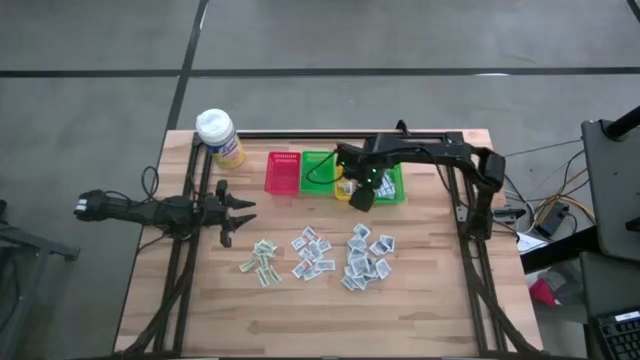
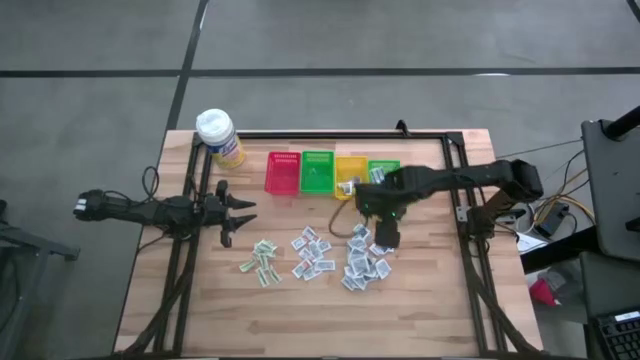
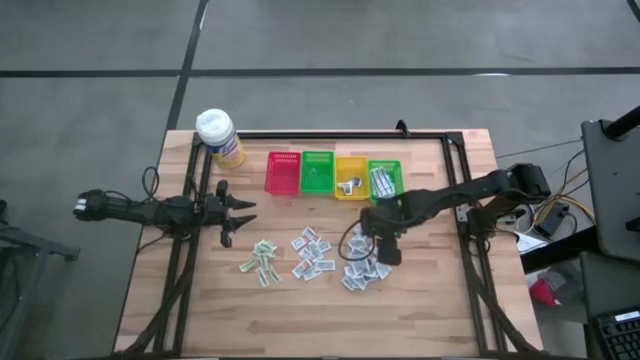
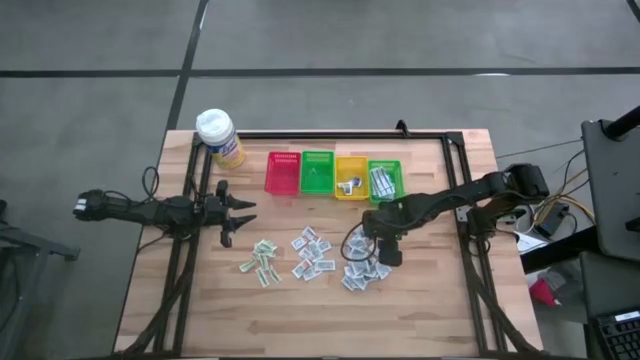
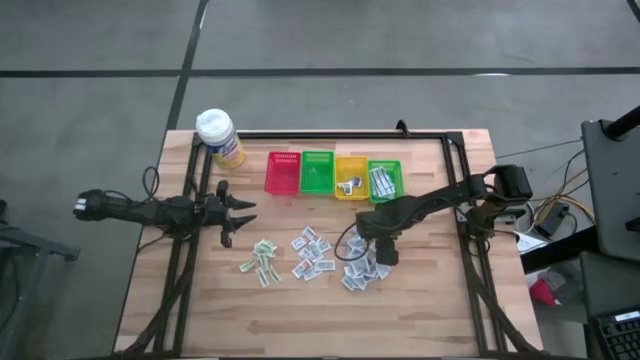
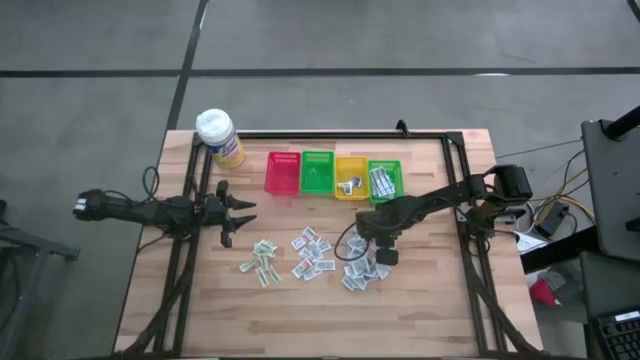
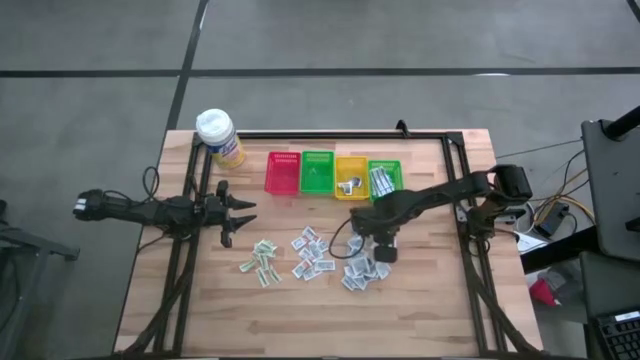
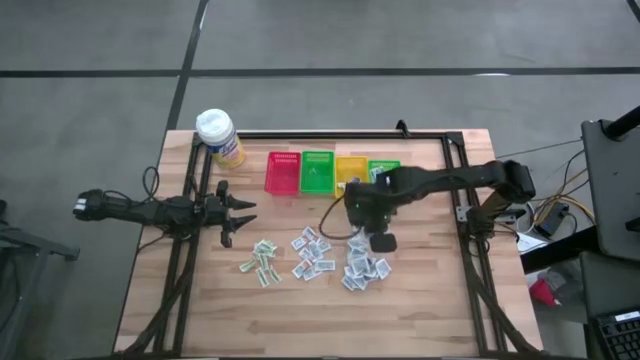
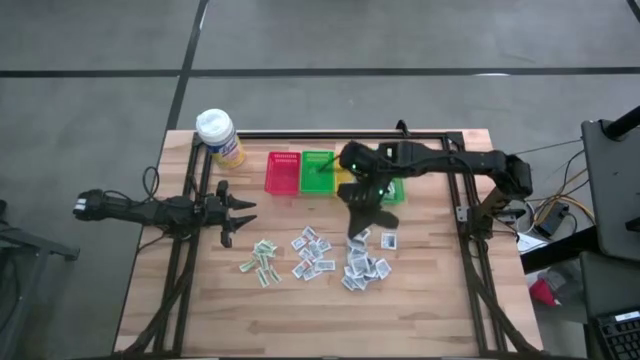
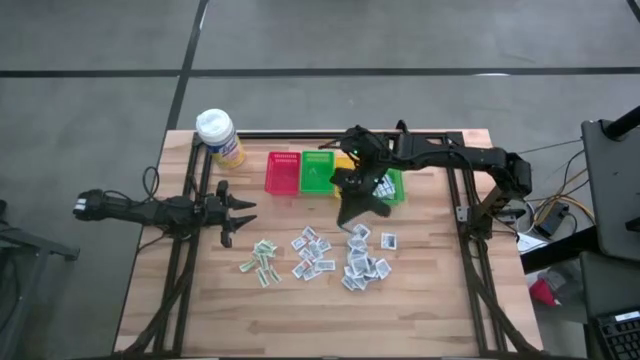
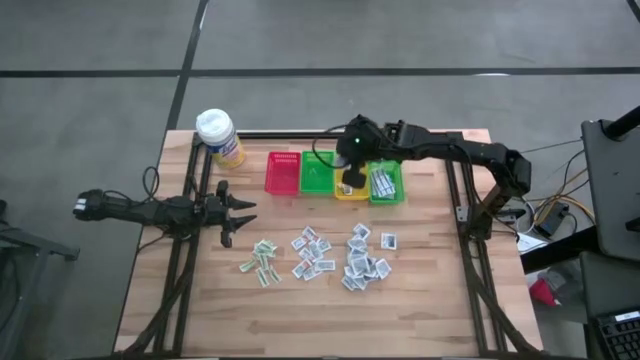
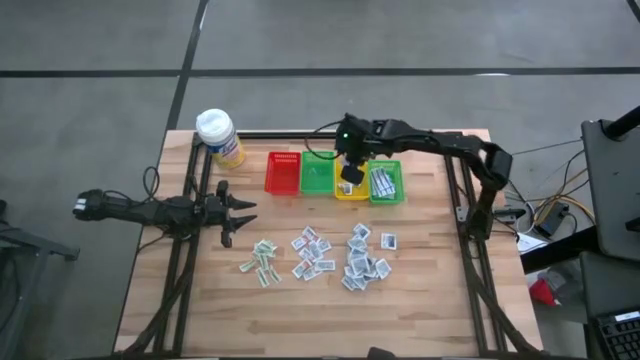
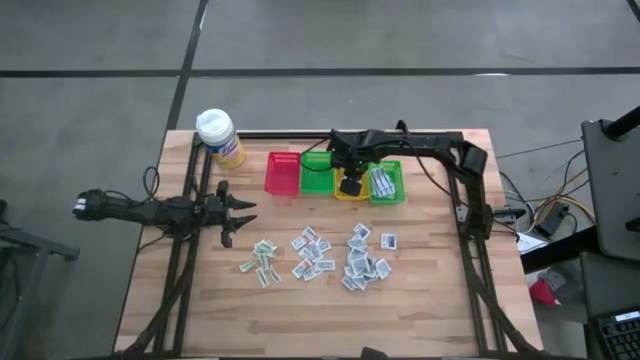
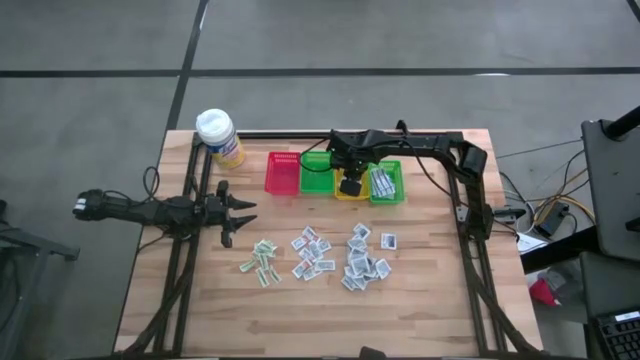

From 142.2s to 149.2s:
Task: Pick & Place First Aid Supplies
Put the blue alcohol pad into the yellow bin

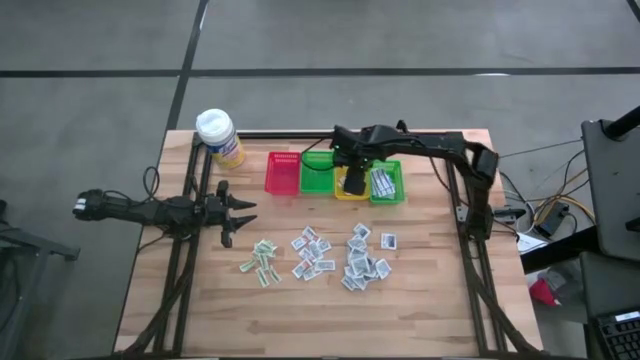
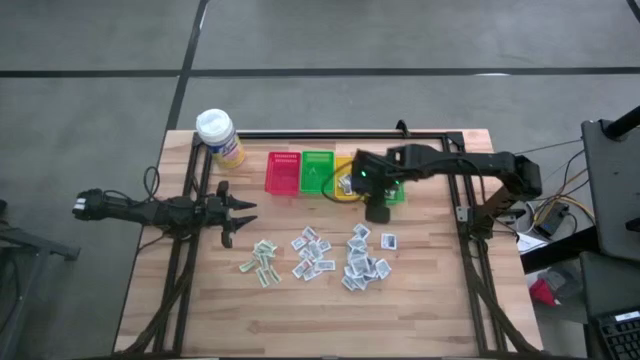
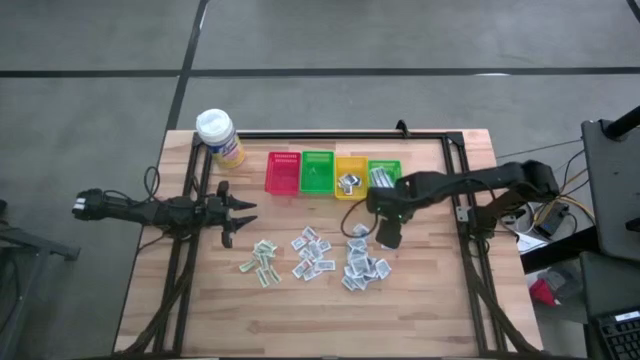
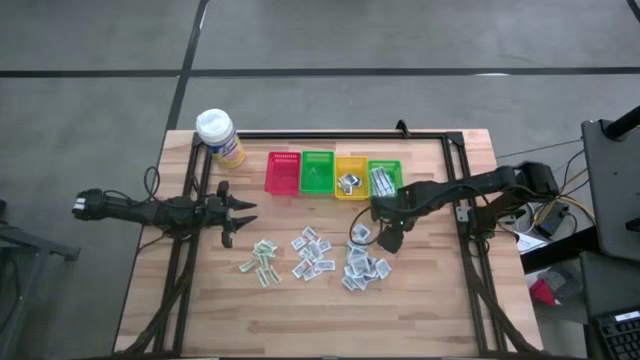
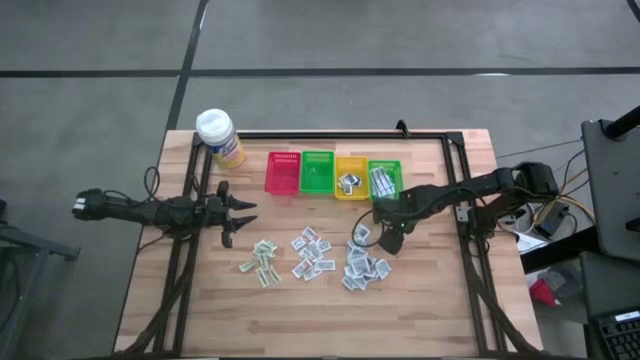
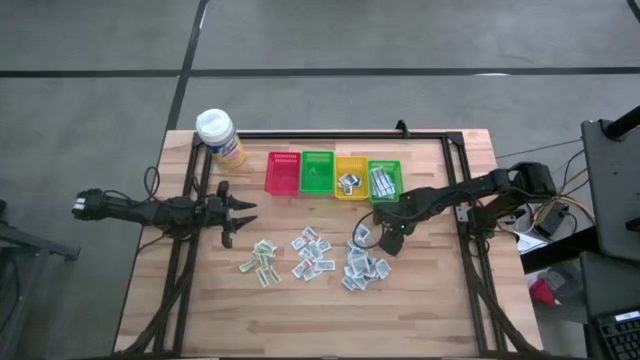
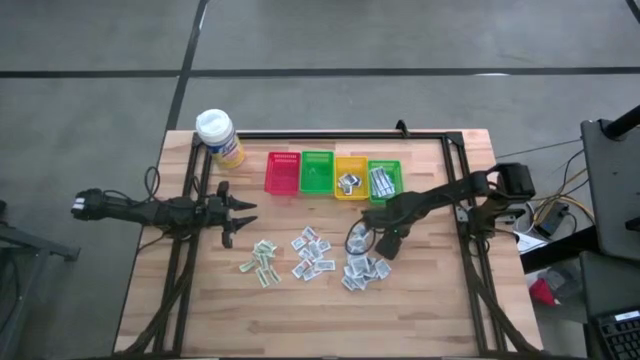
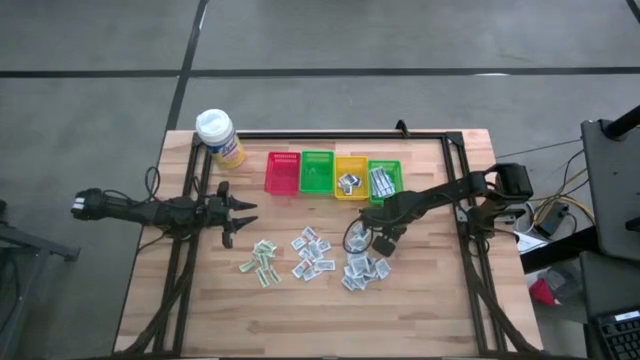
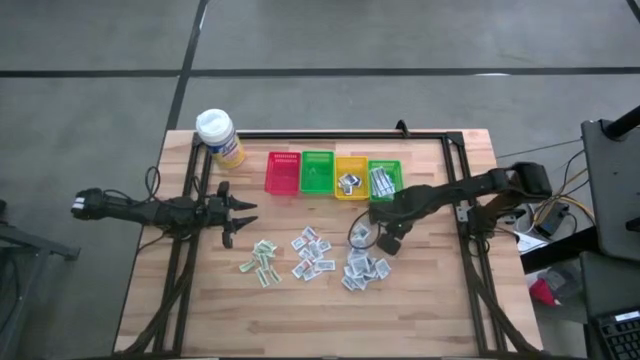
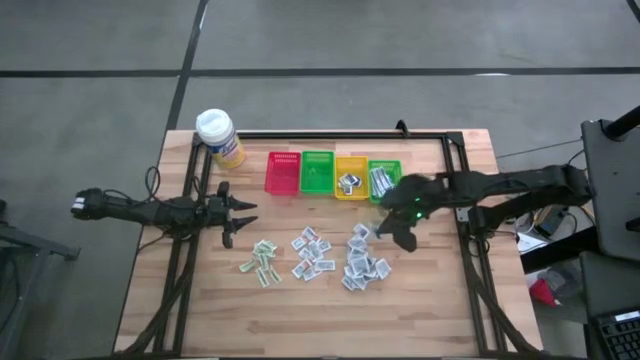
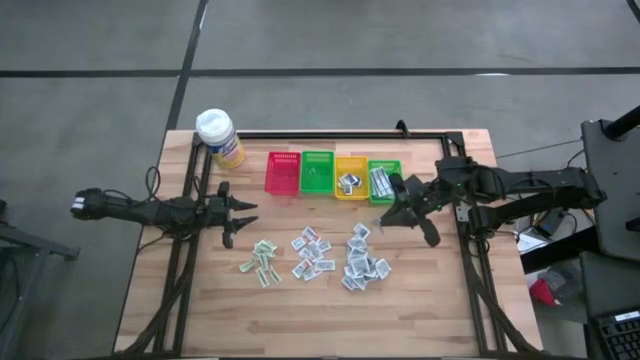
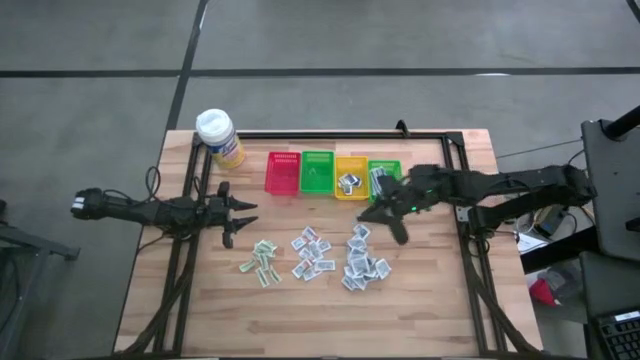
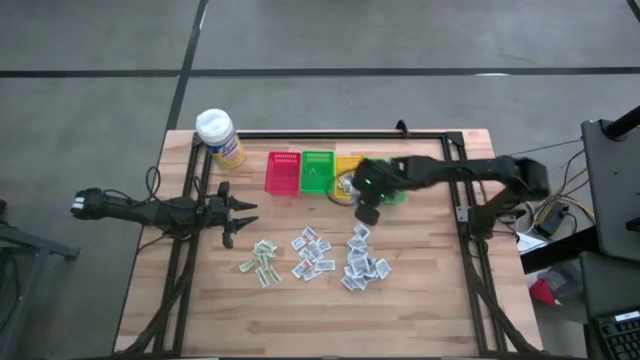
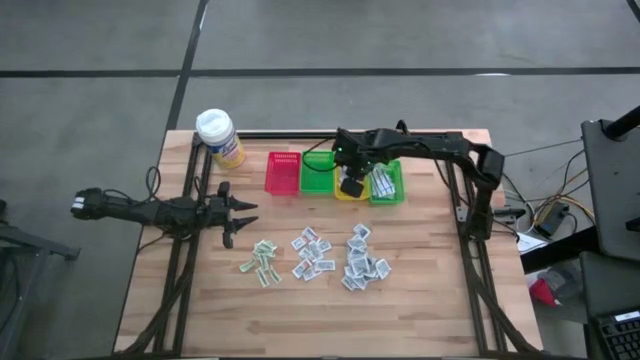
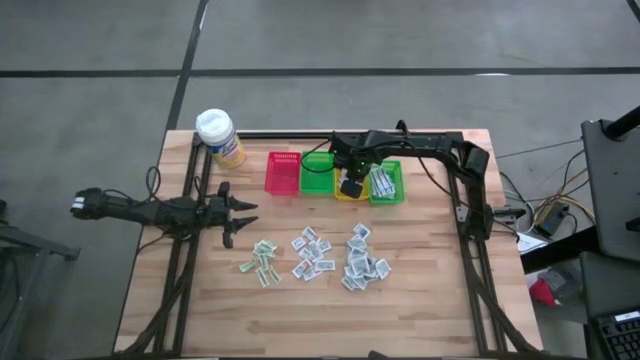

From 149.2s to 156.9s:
Put the blue alcohol pad into the yellow bin

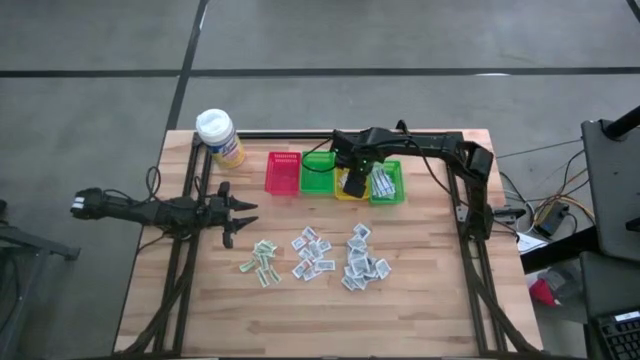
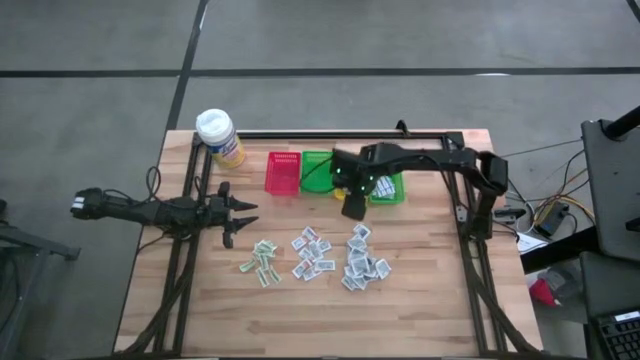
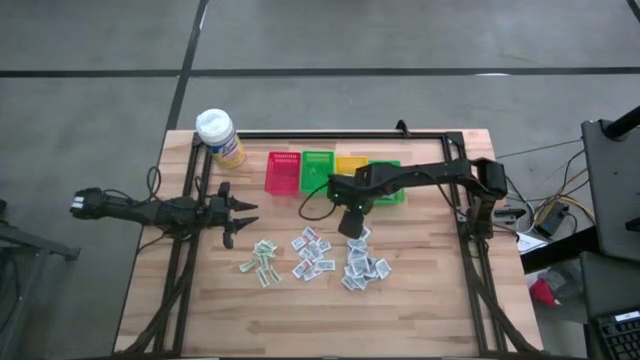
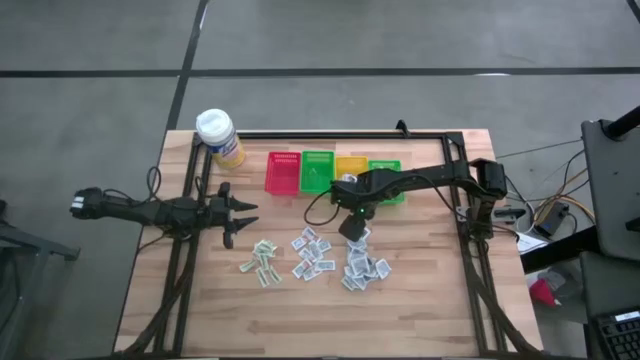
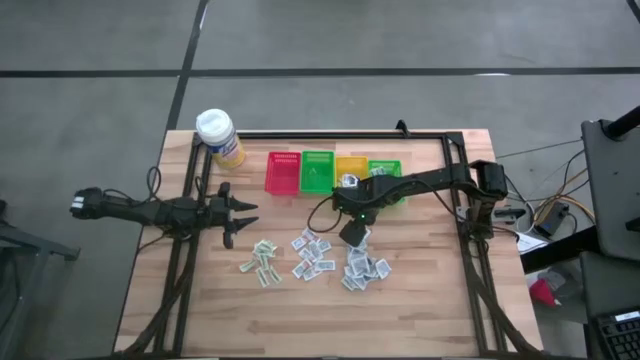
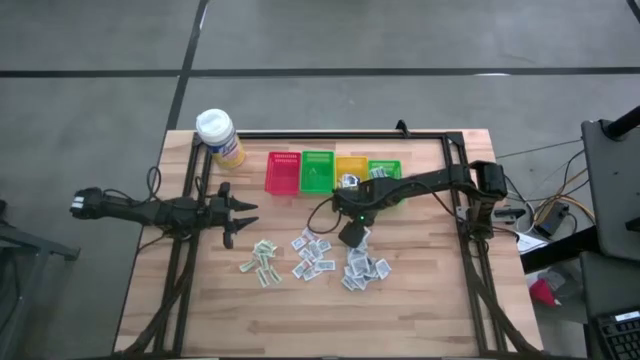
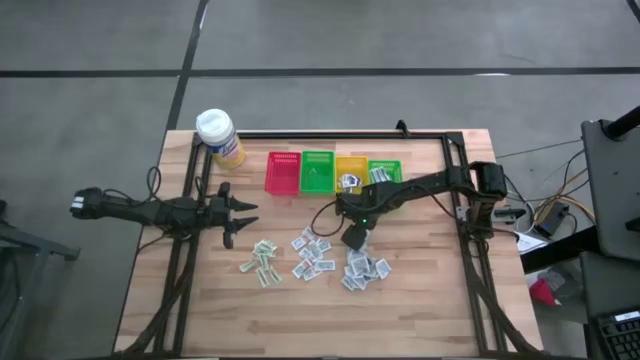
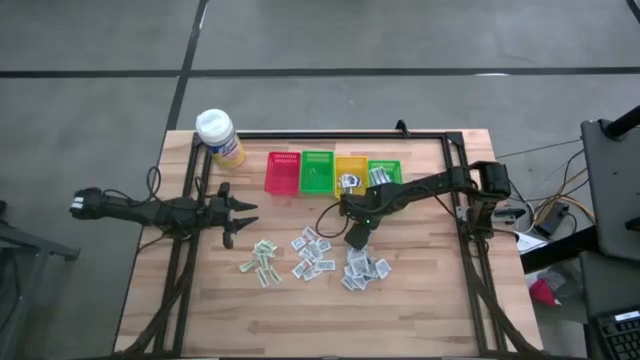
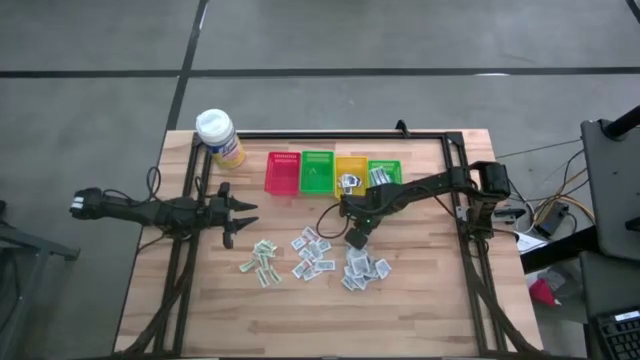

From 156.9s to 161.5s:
Put the blue alcohol pad into the yellow bin

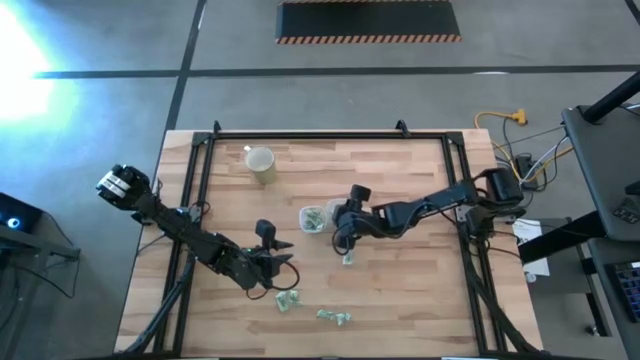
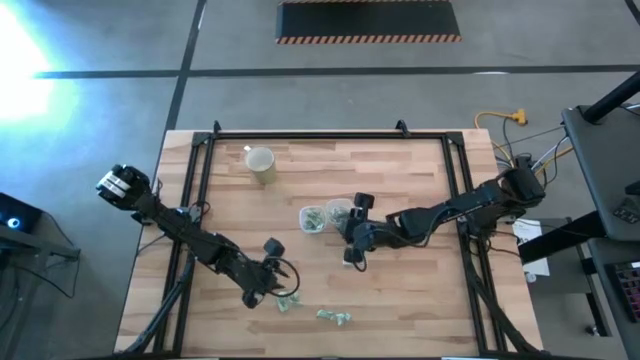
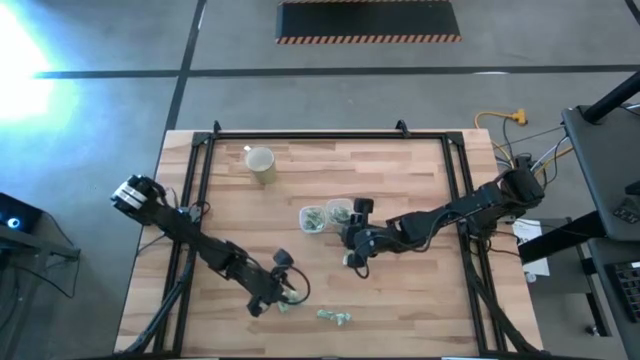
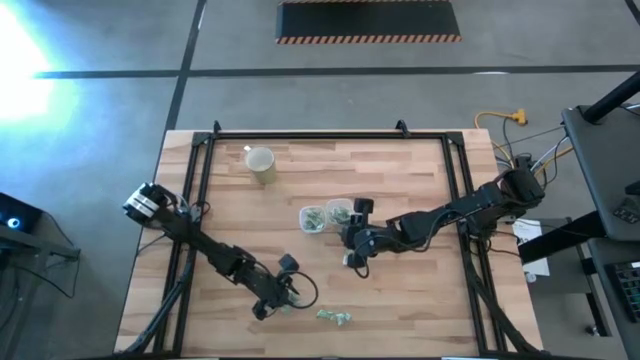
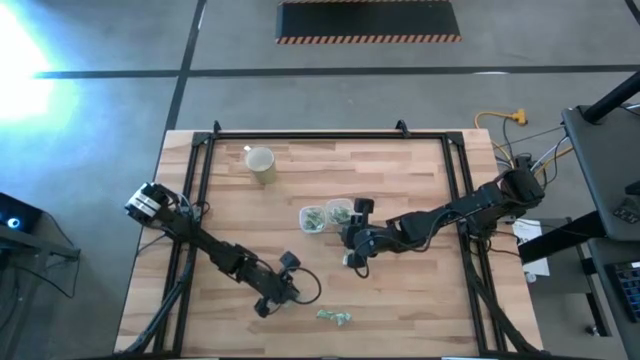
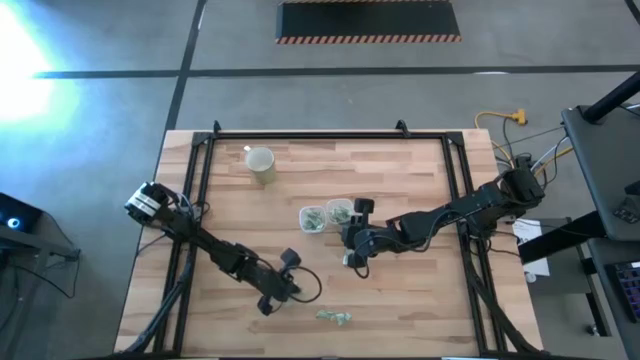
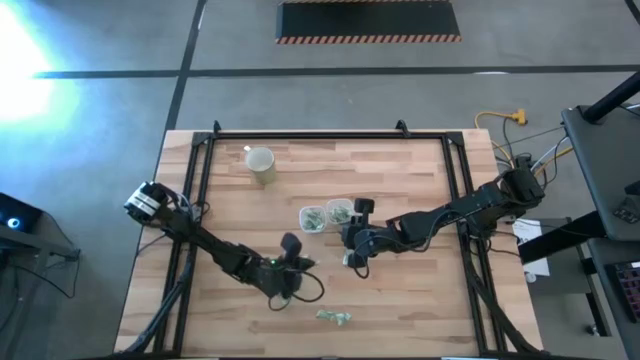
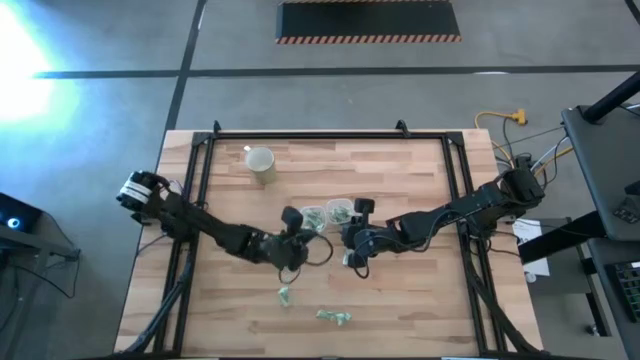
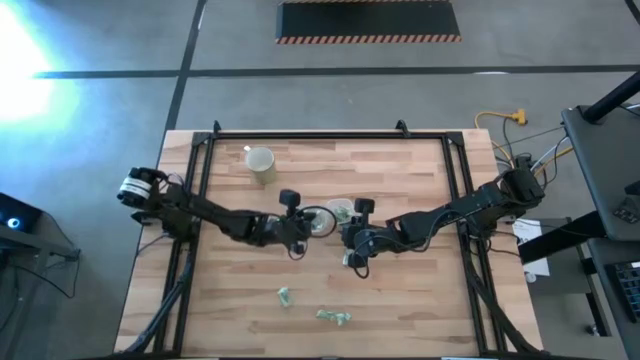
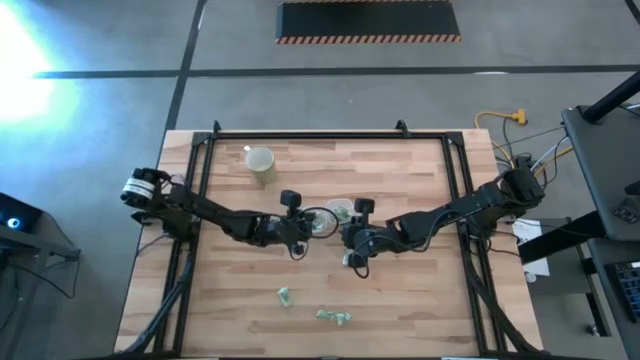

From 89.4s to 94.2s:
Task: Pick and place items into bin
Put the stevia packet into the left transparent bin
